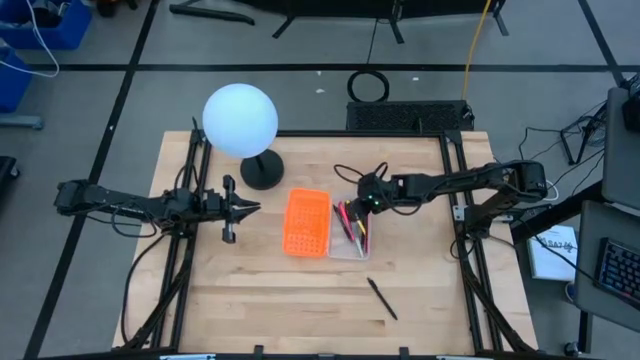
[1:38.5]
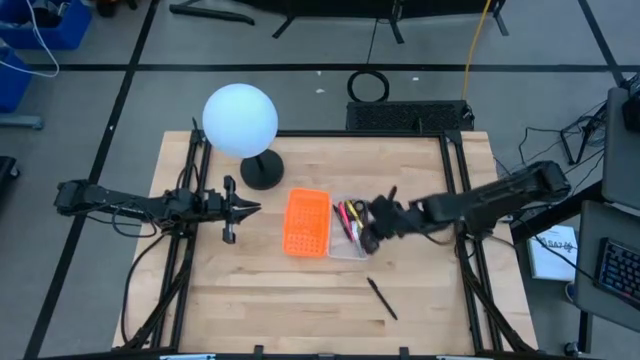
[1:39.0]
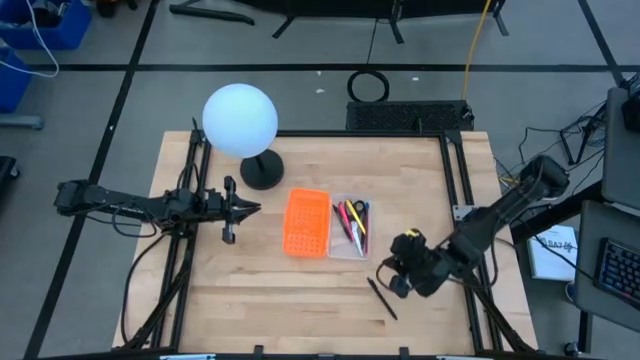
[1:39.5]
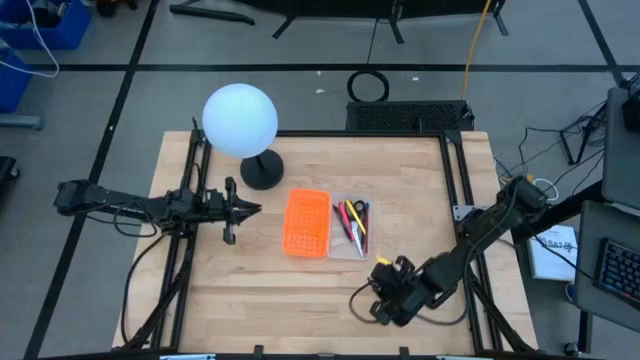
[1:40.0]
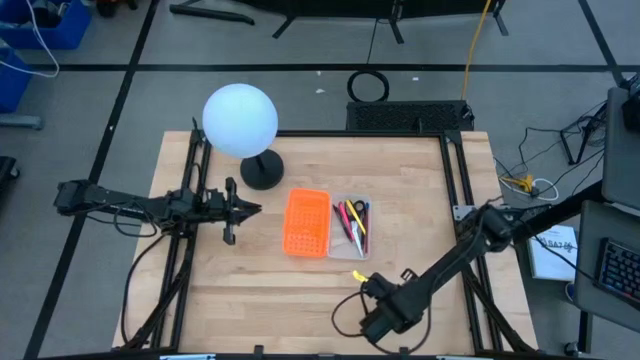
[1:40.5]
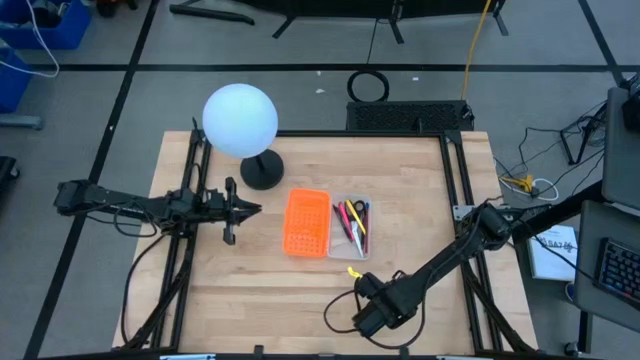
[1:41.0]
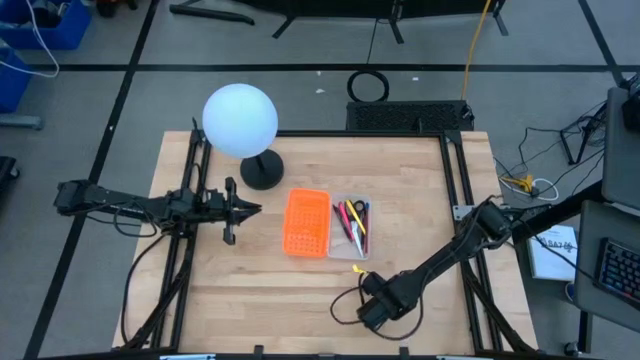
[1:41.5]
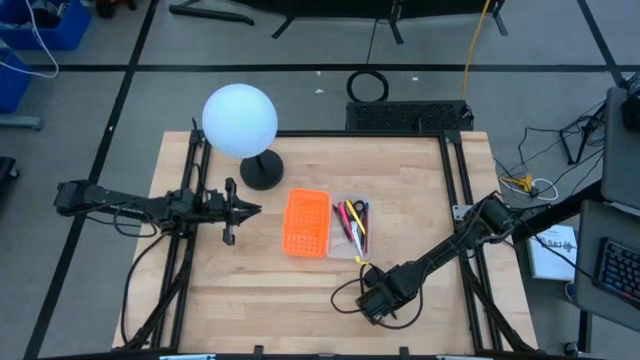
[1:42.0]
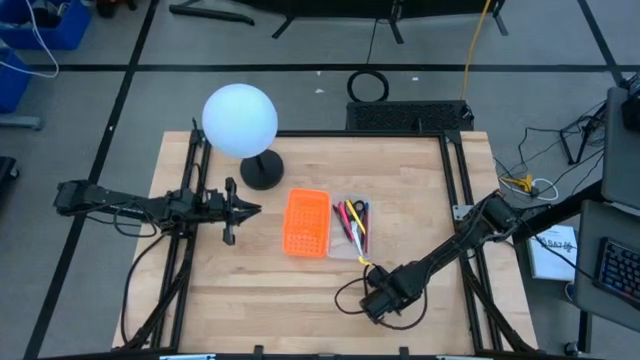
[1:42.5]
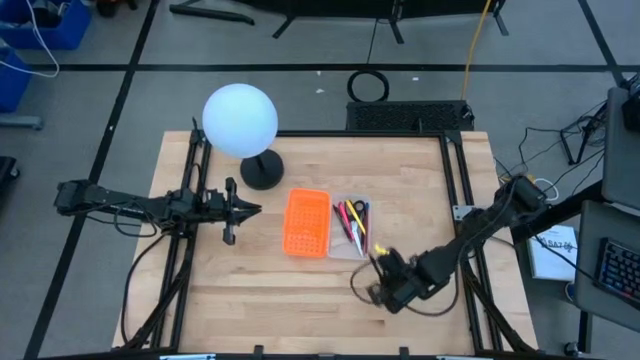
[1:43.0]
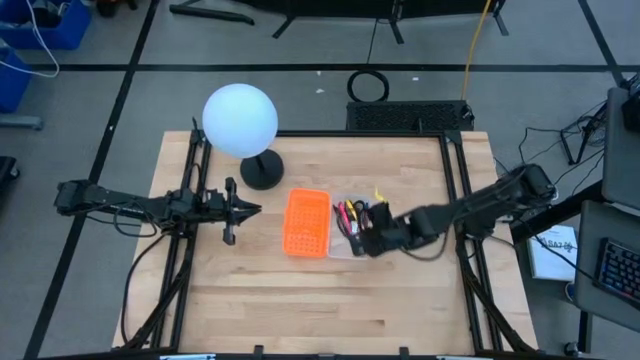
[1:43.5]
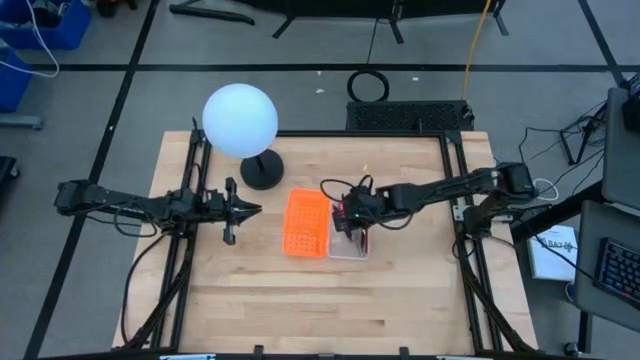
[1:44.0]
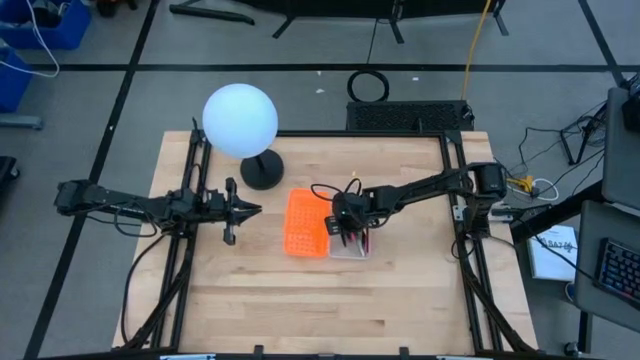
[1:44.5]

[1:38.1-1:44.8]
Task: Pick & place school supplies into a supply box
Put the black pen into the orange supply box

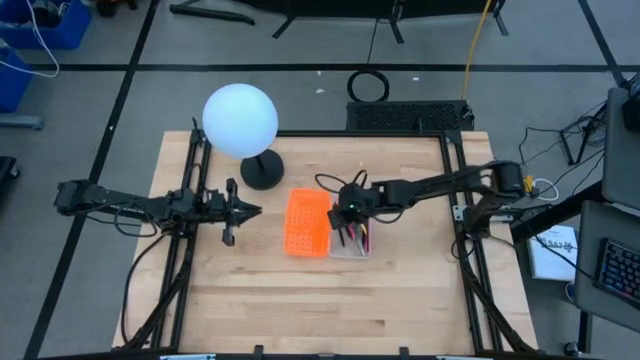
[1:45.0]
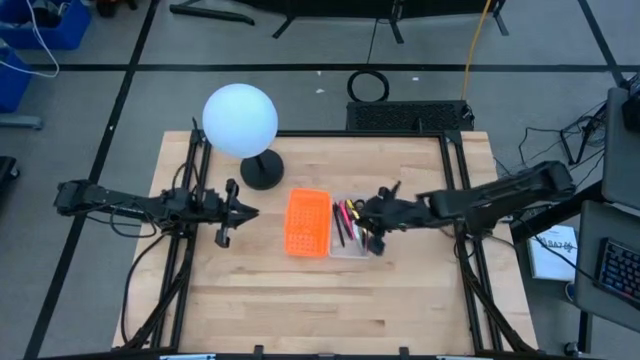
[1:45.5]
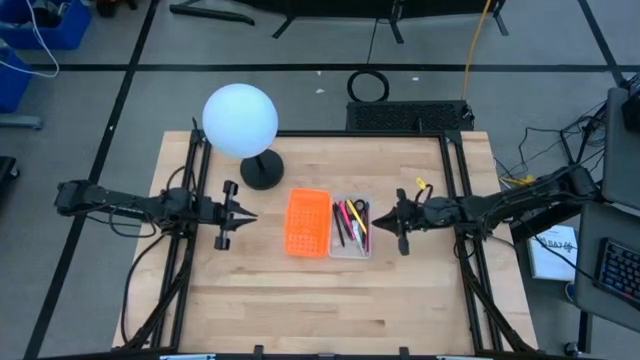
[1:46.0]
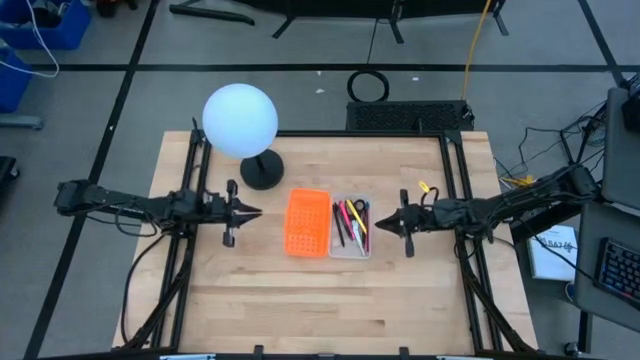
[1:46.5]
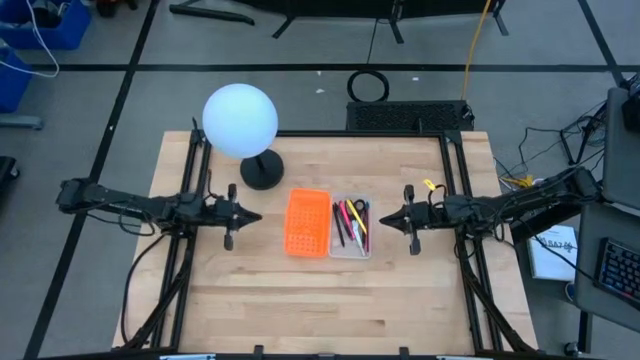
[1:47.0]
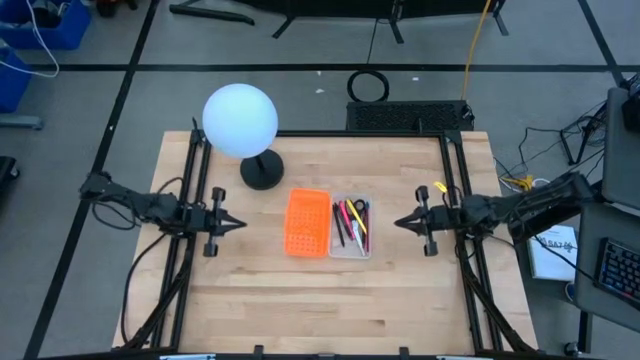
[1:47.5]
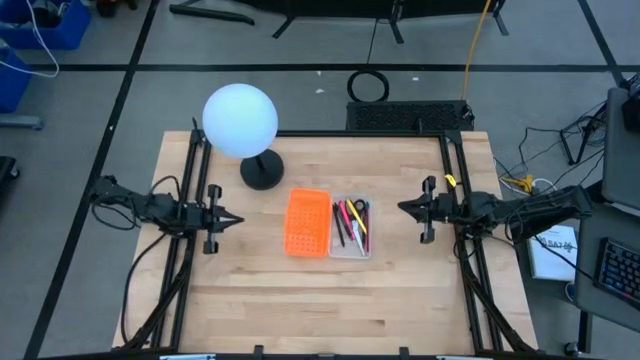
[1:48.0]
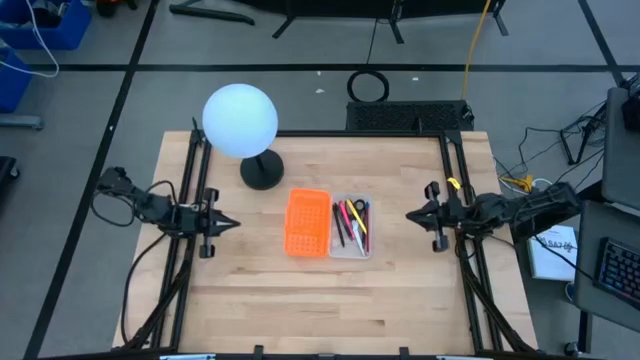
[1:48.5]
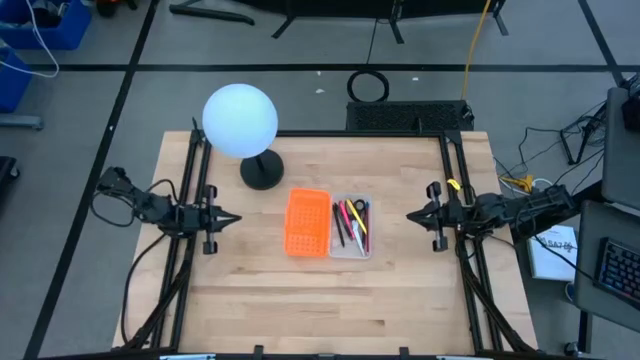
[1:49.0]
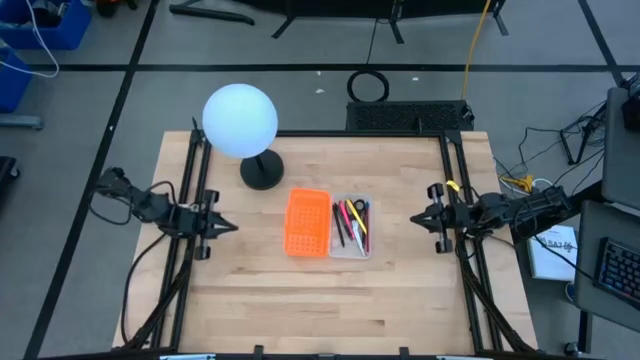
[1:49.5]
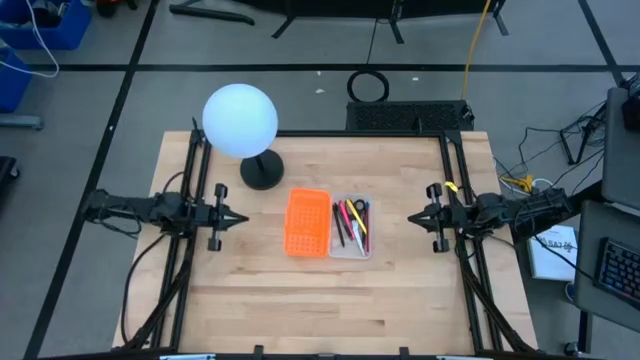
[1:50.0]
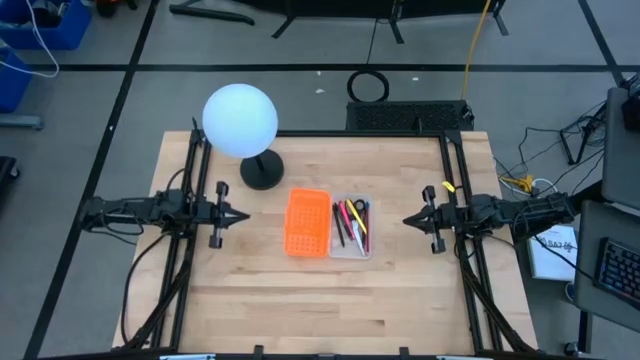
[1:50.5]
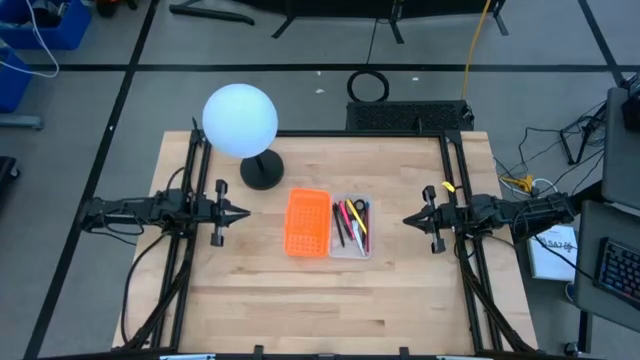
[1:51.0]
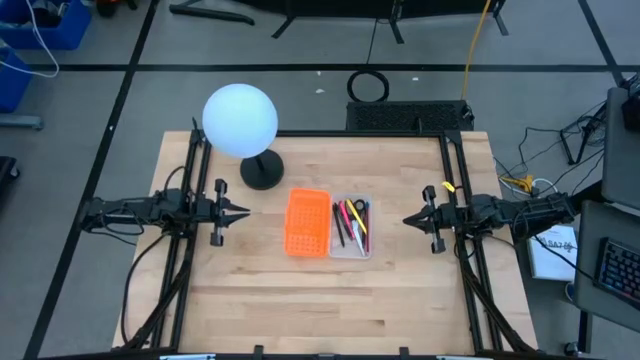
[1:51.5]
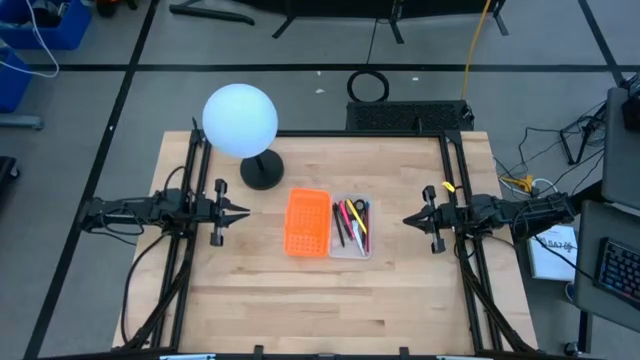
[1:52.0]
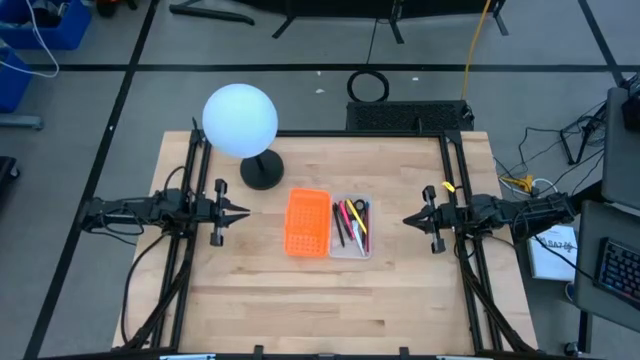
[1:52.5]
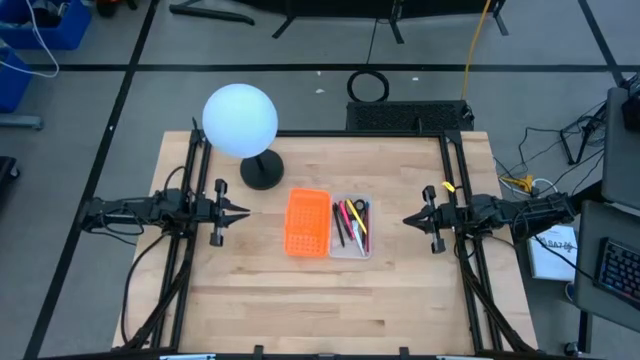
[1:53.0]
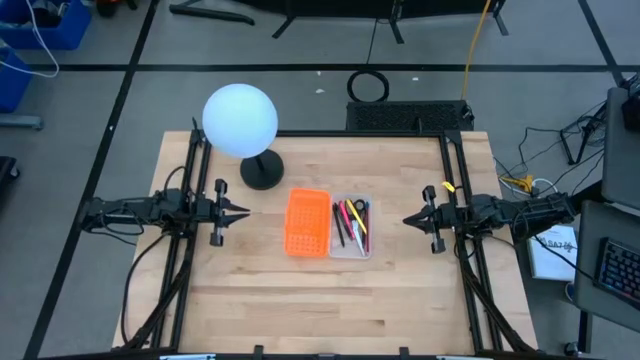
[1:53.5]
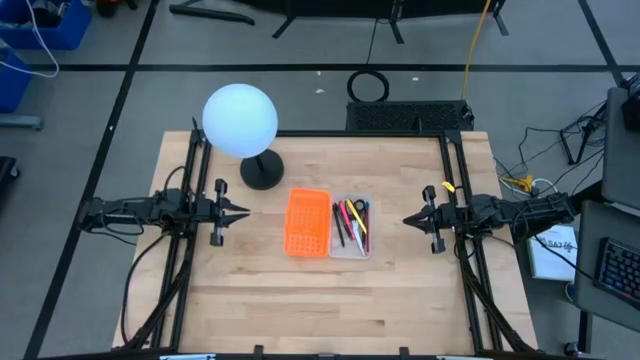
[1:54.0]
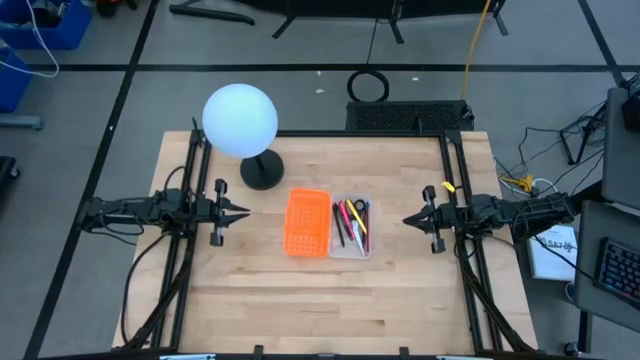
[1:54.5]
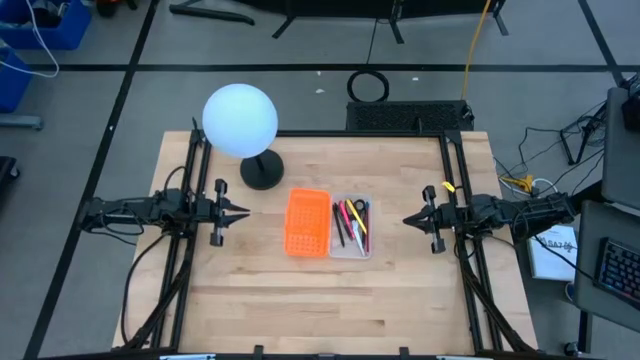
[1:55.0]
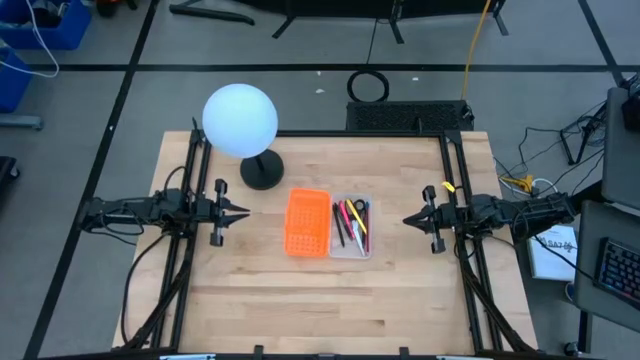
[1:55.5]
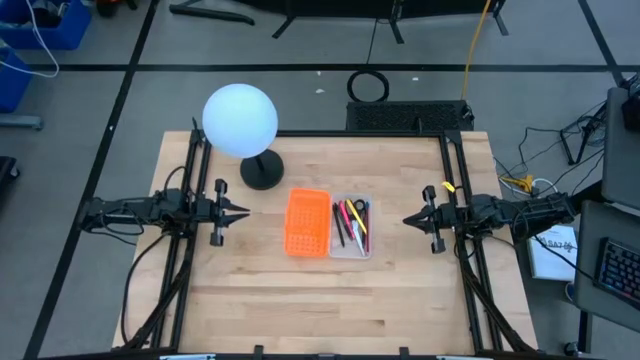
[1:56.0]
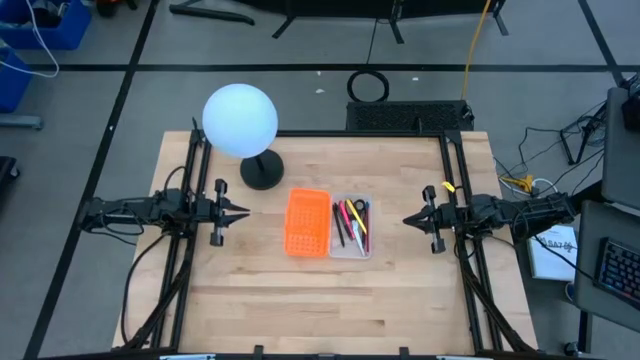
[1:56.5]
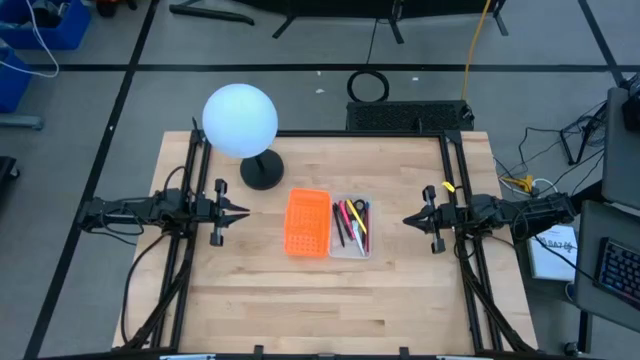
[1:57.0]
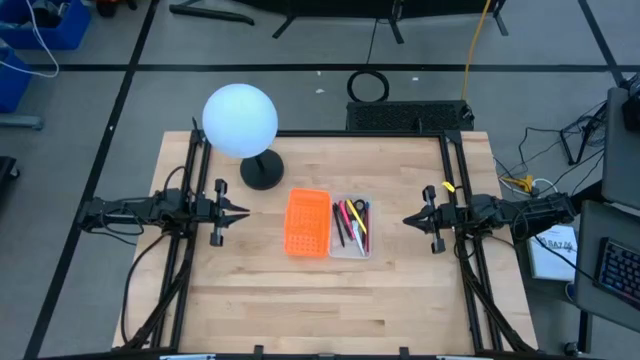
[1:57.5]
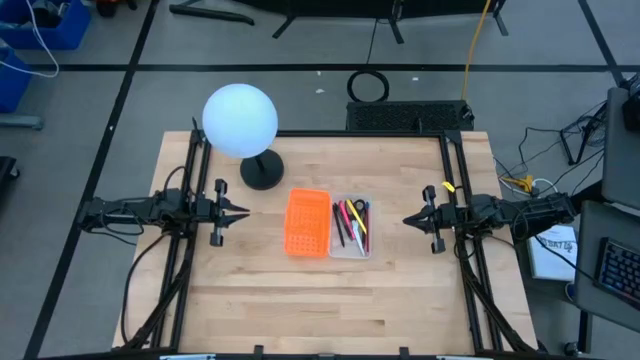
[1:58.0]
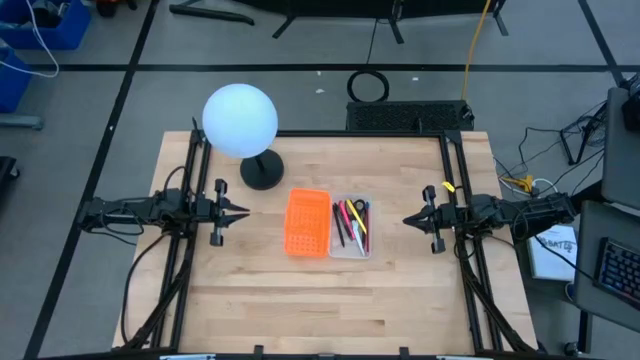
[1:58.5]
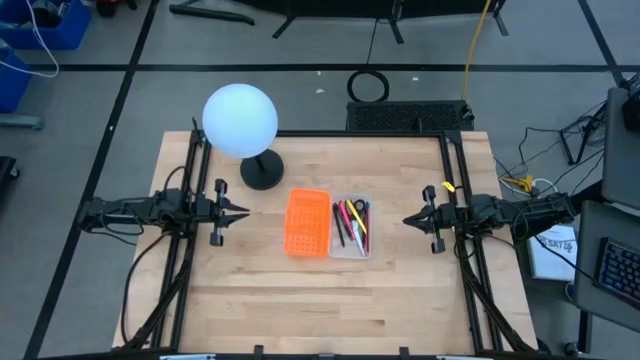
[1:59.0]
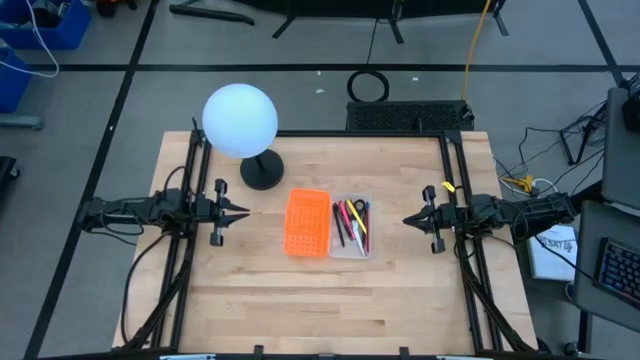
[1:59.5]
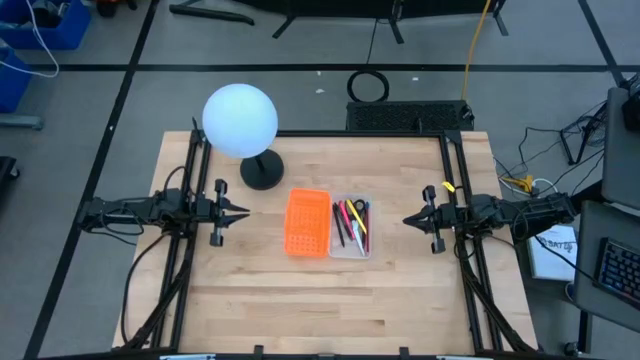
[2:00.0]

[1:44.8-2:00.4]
Return to Home Position
